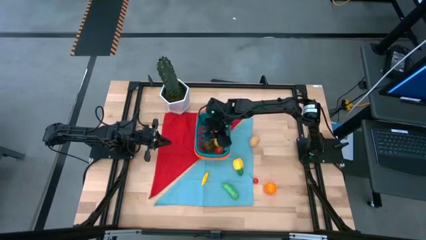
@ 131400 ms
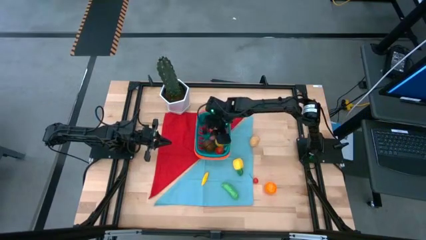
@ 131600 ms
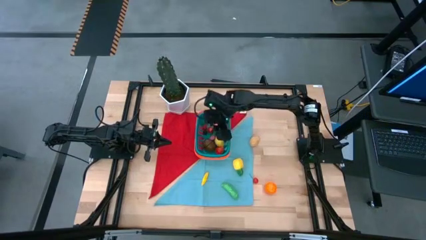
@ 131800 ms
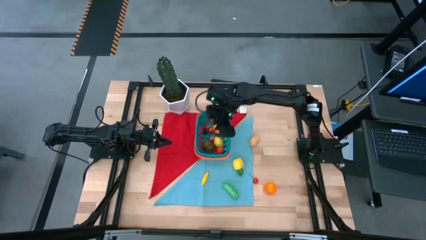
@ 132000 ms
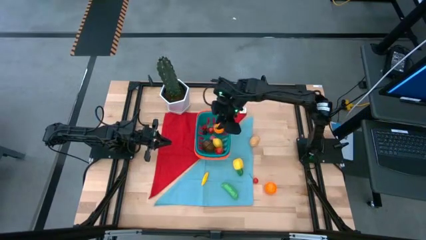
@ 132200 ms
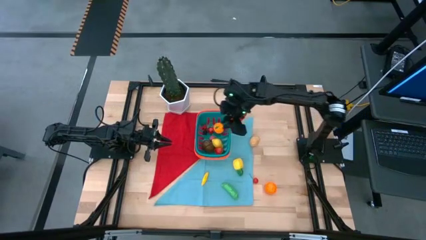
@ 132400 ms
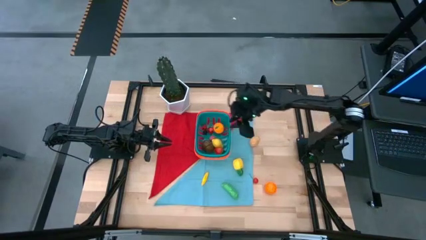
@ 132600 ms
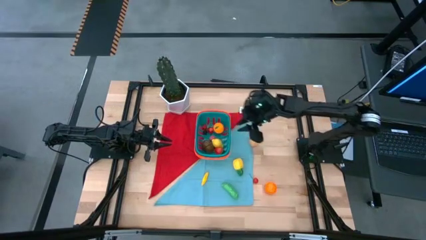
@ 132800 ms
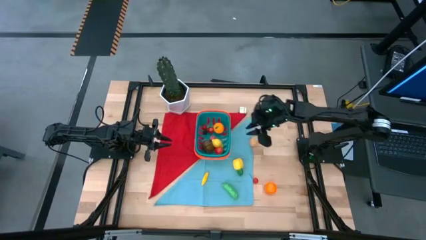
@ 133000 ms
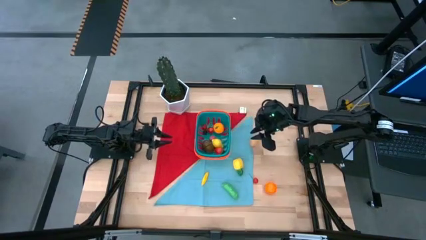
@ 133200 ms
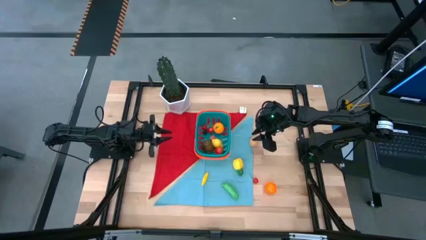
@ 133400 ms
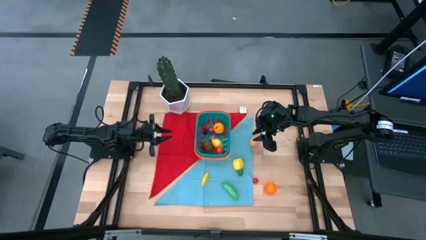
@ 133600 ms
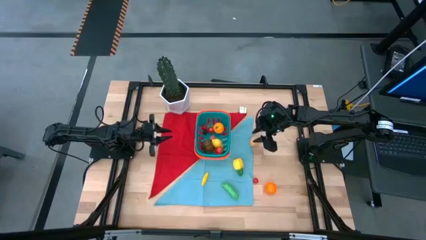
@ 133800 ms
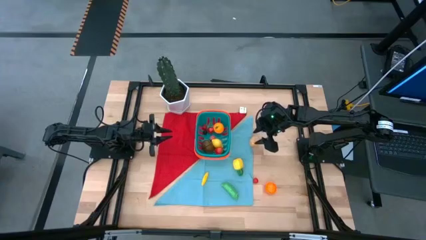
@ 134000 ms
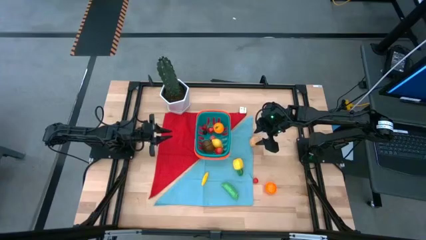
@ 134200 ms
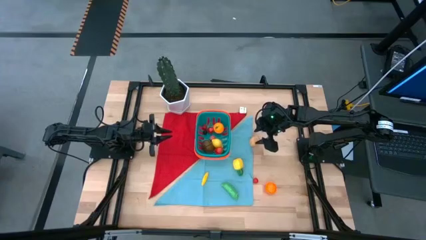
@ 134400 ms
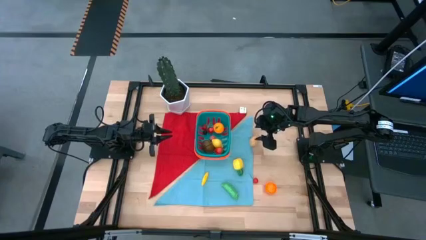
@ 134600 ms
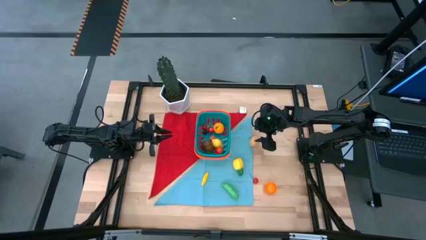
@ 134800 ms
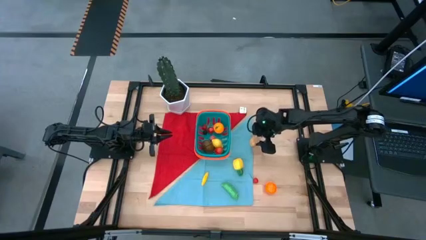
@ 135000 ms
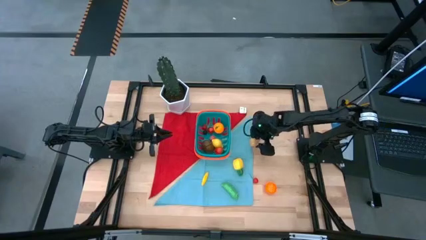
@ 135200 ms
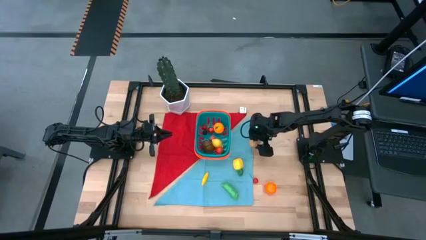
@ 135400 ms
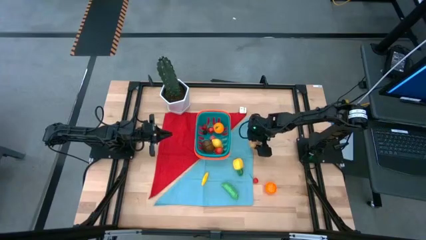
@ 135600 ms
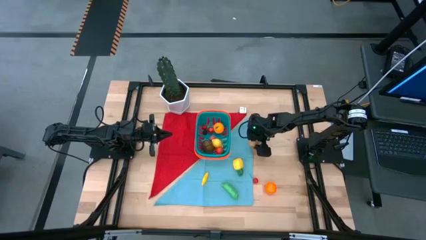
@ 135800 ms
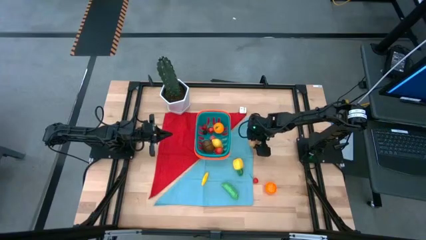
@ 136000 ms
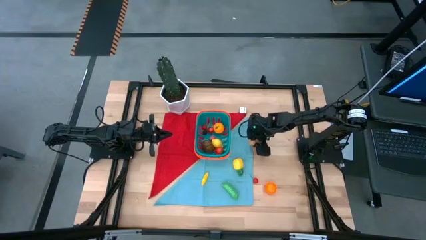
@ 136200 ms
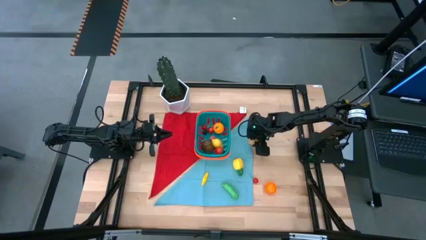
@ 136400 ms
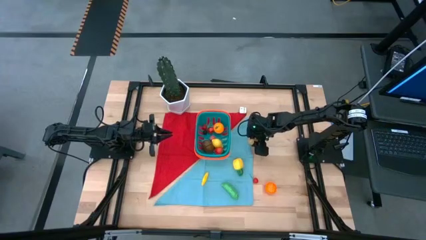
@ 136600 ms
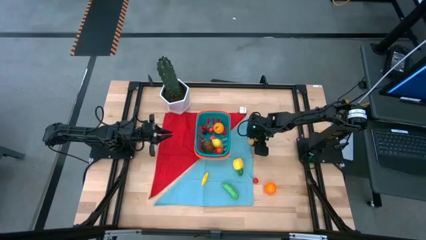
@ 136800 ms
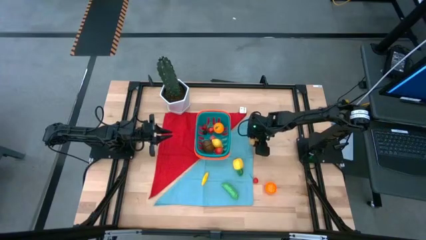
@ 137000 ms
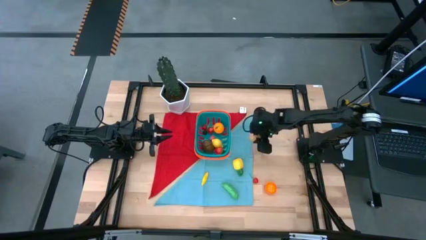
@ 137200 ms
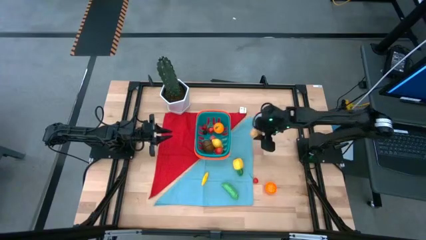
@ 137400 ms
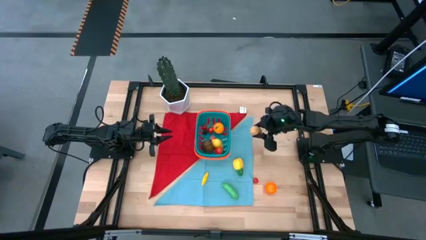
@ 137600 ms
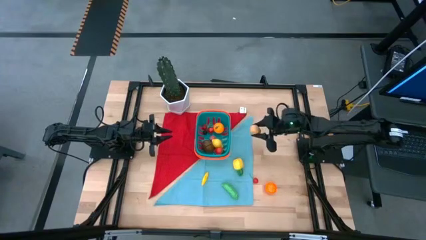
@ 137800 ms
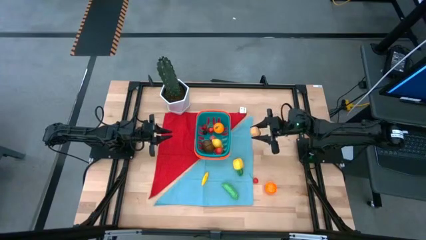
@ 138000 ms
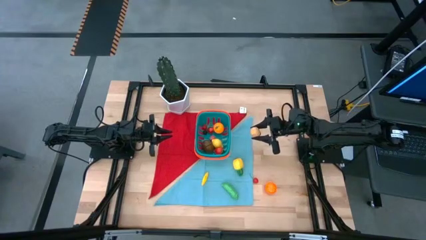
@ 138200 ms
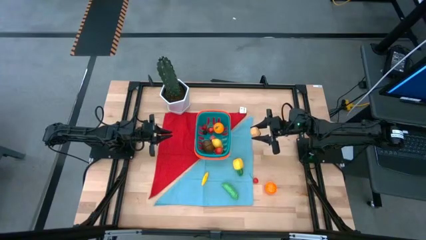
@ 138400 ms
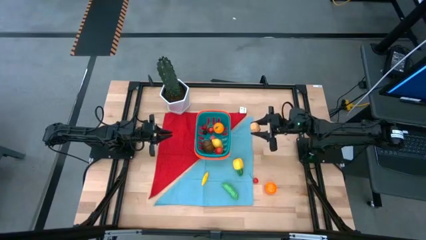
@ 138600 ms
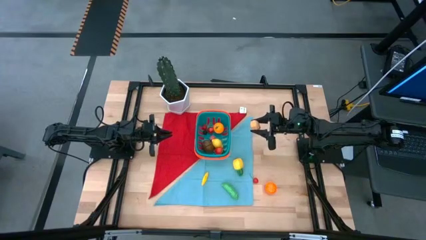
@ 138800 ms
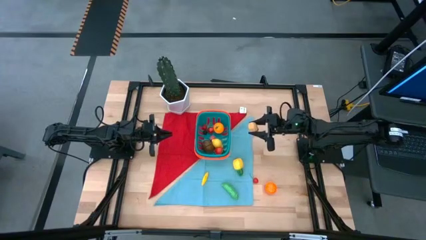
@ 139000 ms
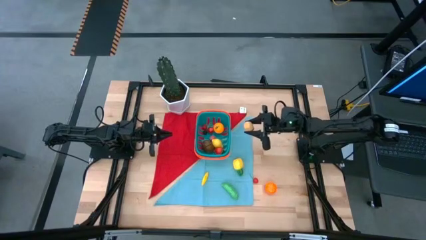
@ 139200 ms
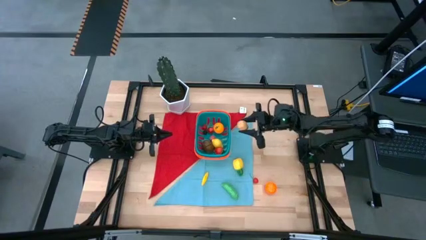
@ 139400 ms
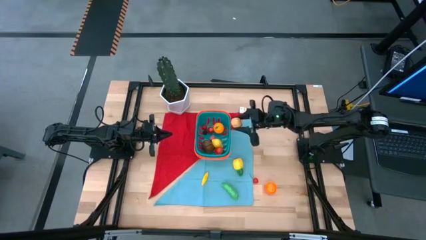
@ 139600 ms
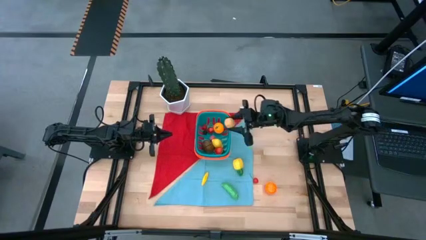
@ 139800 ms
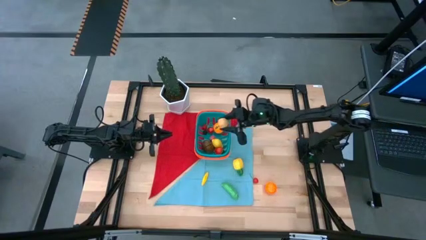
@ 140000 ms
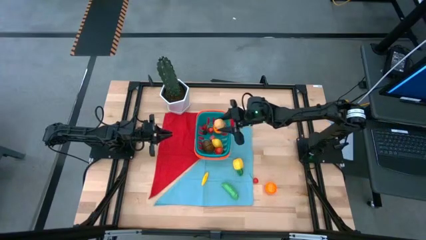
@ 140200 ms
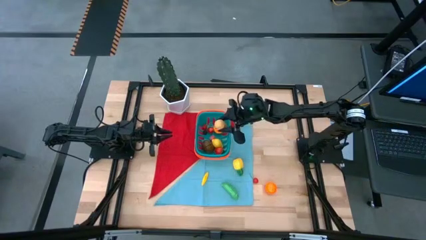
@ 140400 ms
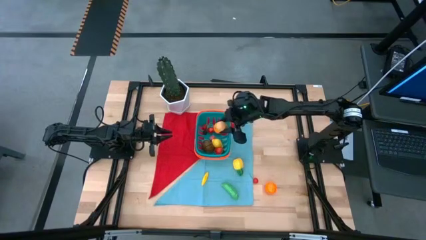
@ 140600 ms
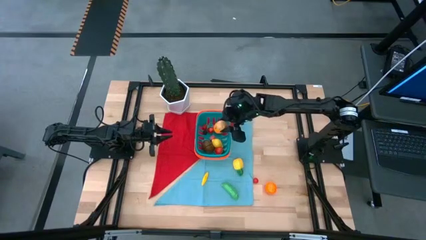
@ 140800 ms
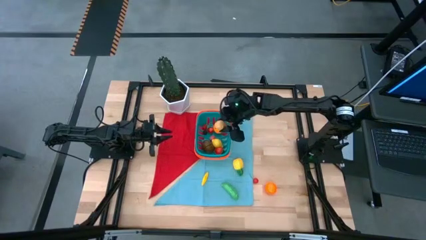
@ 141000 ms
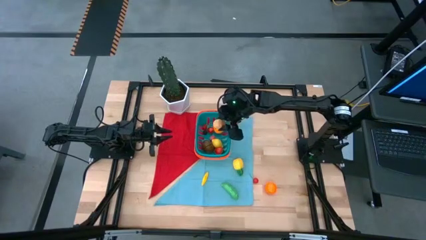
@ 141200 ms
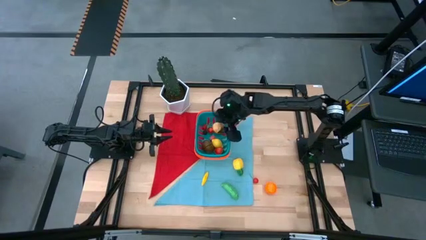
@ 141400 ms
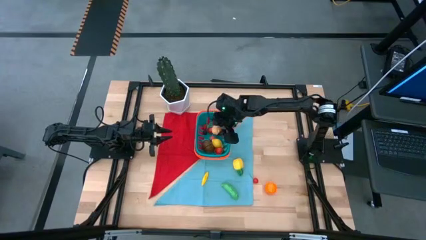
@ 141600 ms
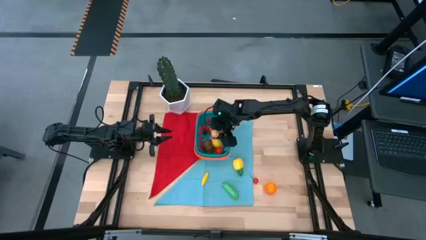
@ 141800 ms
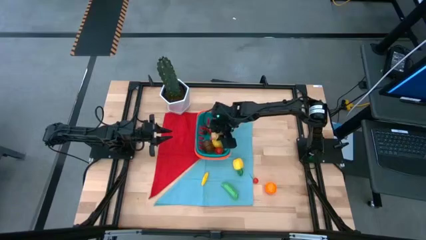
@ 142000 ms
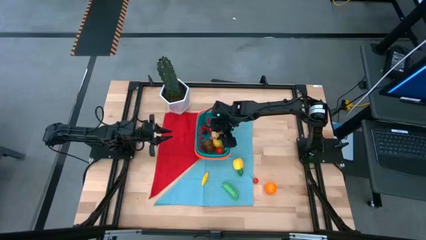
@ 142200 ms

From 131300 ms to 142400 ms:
Task: Pick and placing Produce into tupperware
Put the potato into the blue bin

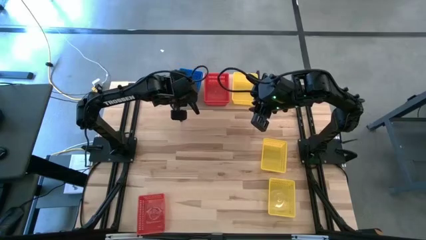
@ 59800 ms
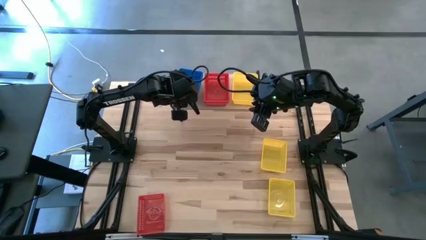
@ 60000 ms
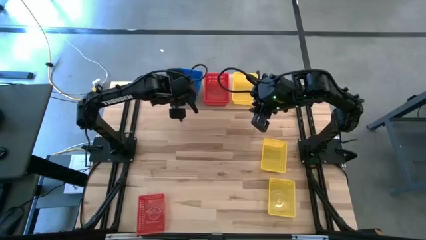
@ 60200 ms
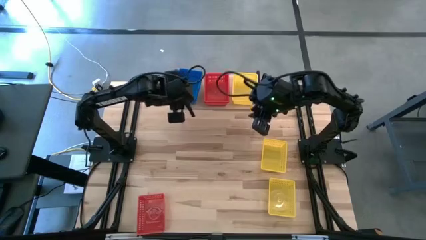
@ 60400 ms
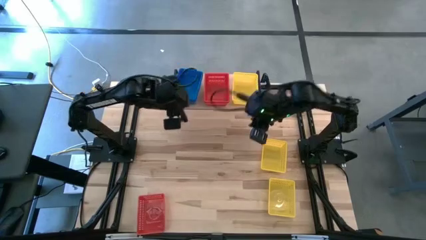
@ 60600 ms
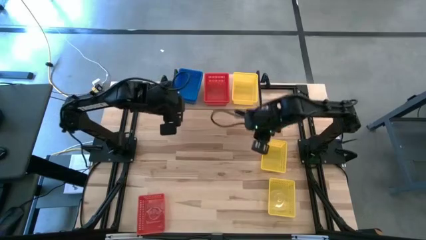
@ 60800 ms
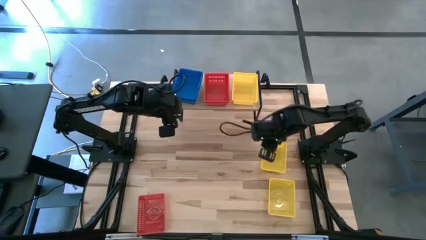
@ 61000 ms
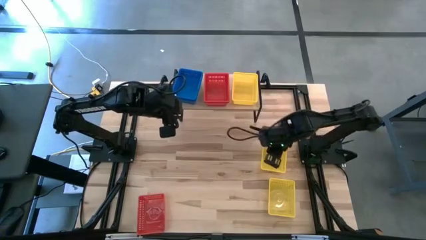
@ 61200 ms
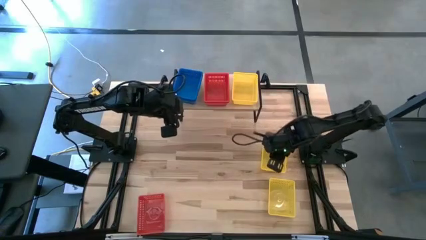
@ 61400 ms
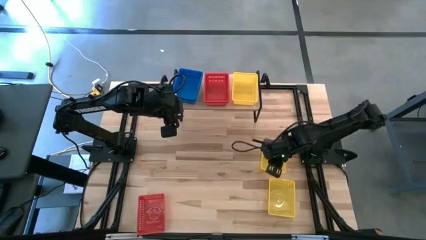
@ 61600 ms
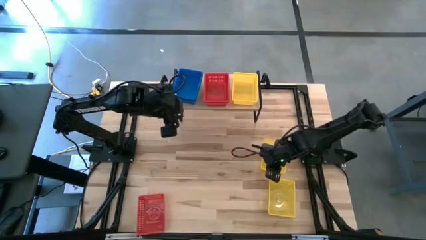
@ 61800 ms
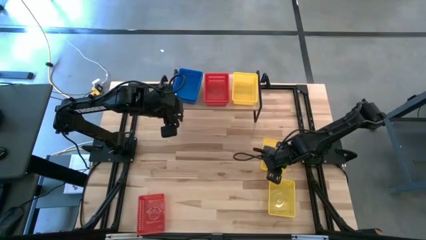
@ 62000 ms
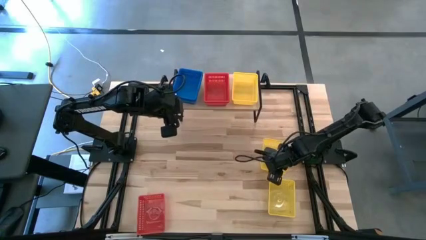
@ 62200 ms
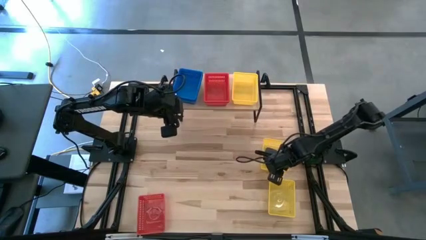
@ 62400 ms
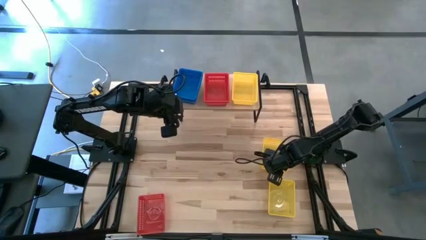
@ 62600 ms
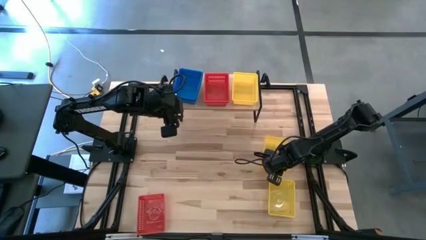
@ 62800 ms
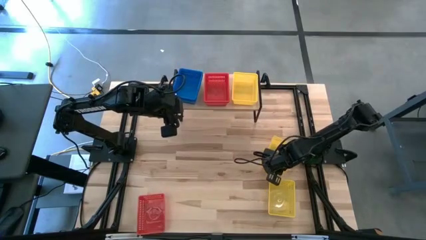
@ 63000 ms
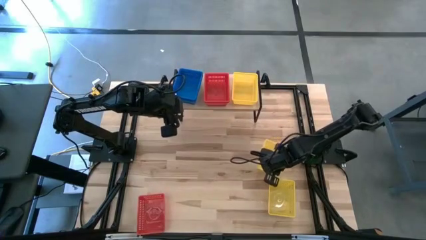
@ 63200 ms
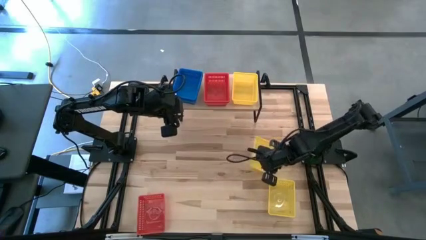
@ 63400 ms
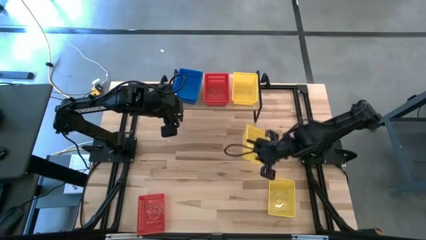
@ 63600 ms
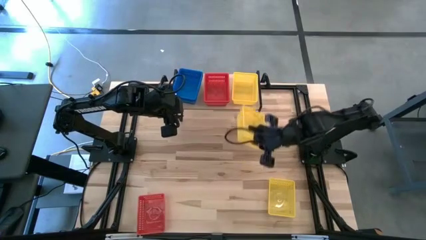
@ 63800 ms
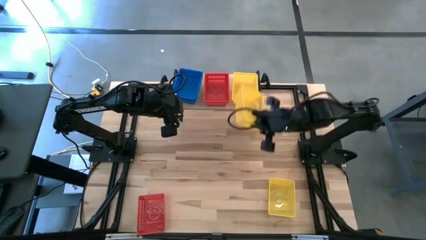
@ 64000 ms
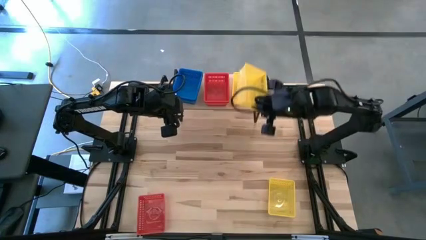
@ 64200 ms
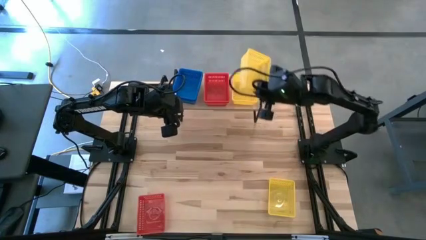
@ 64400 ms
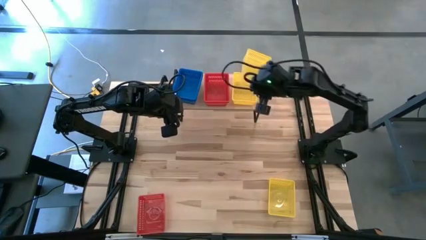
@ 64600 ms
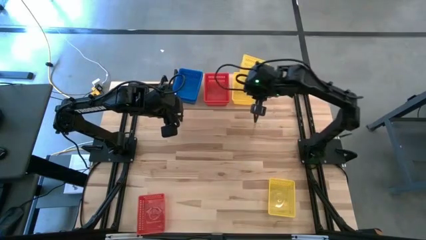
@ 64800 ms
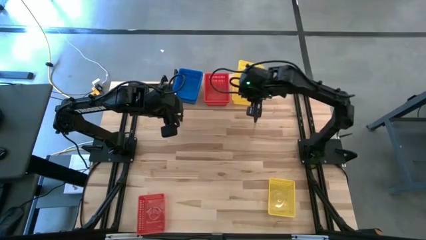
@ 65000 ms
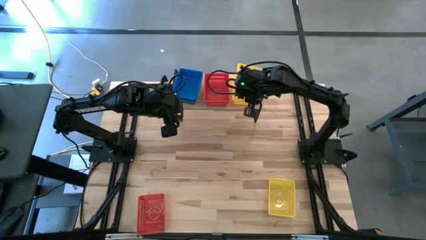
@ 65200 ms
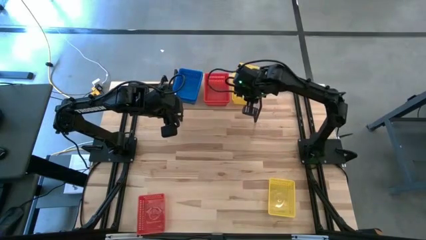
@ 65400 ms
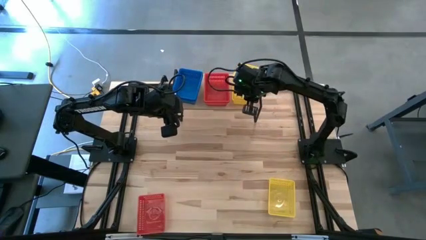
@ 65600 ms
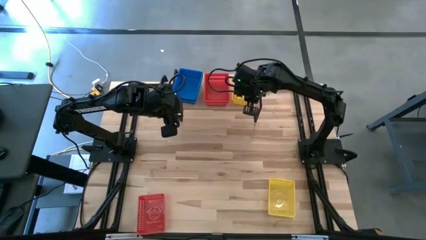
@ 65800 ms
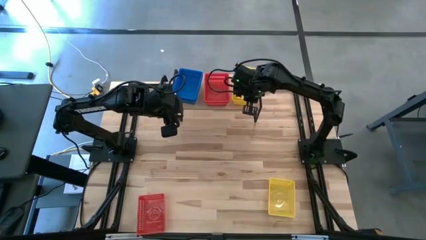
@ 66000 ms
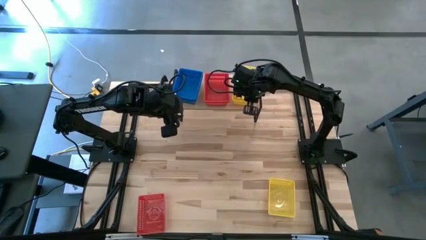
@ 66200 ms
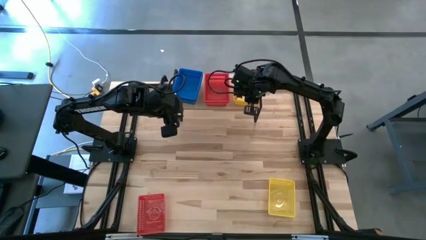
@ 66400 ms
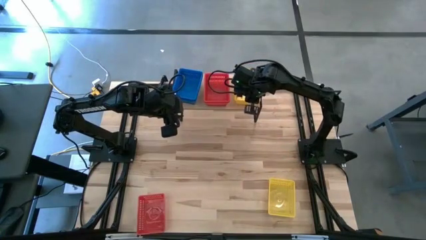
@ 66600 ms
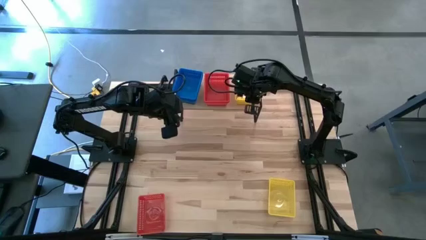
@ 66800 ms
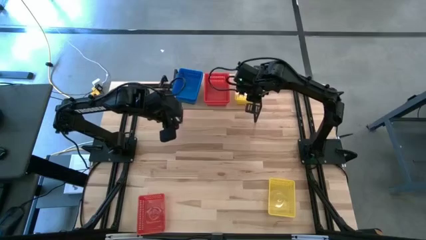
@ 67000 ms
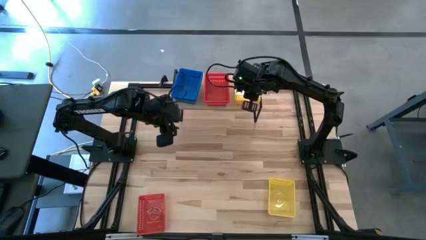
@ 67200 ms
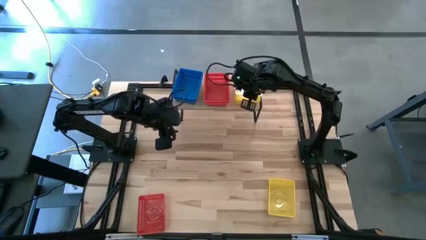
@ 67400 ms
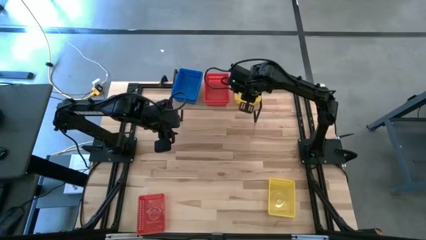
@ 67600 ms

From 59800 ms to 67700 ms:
Task: Stack baskets on shelf by color
Stack the top yellow bin on top of the yellow bin on the shelf
